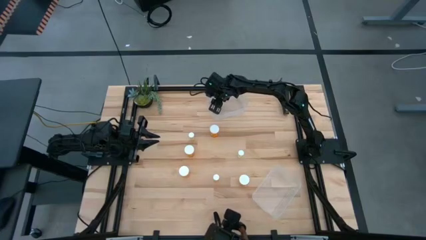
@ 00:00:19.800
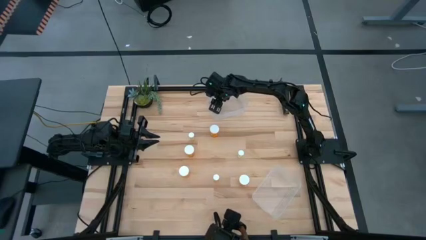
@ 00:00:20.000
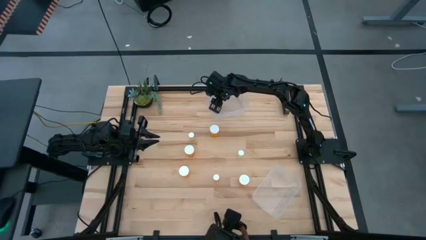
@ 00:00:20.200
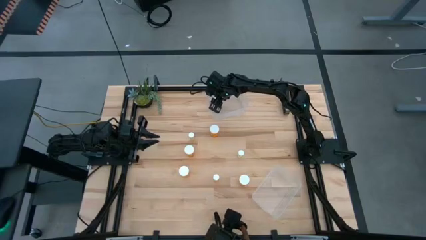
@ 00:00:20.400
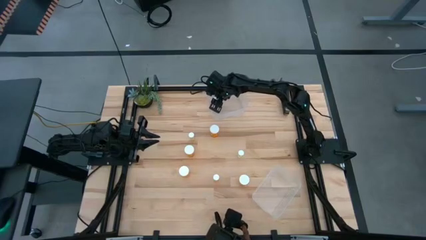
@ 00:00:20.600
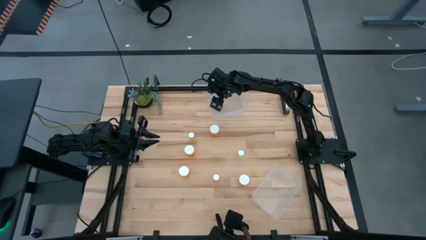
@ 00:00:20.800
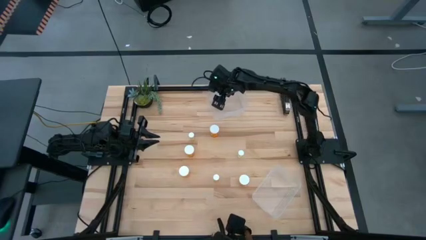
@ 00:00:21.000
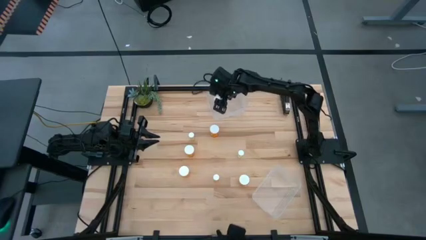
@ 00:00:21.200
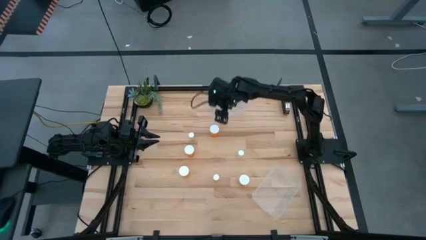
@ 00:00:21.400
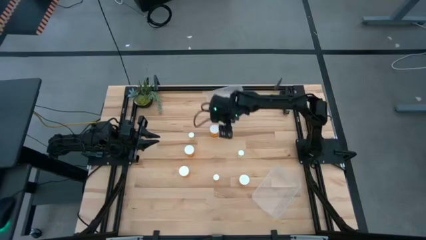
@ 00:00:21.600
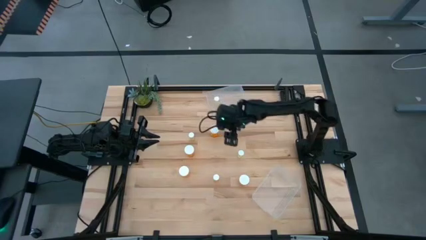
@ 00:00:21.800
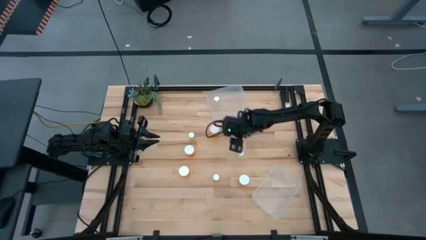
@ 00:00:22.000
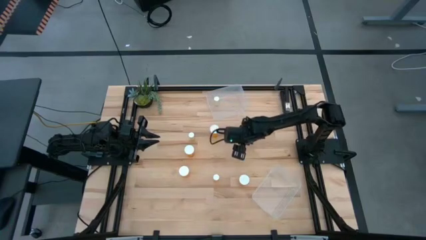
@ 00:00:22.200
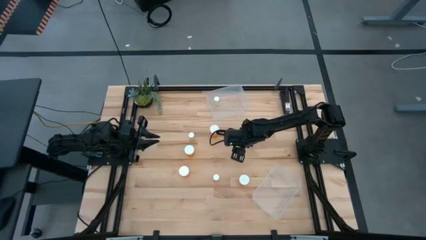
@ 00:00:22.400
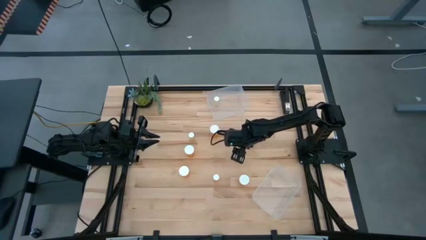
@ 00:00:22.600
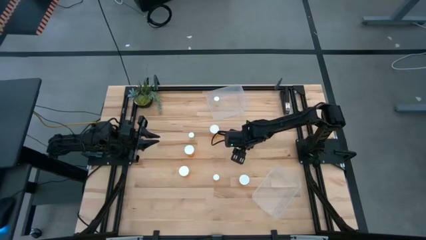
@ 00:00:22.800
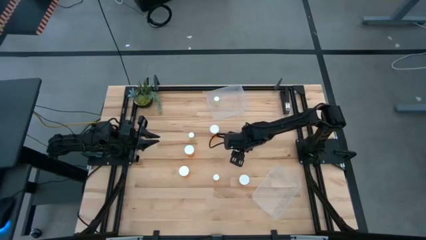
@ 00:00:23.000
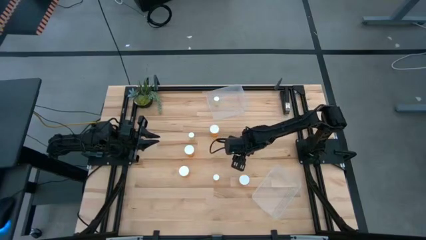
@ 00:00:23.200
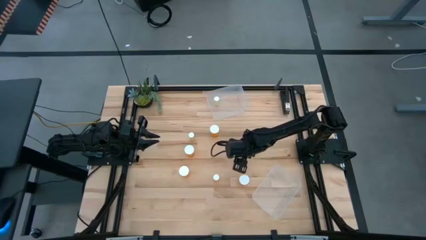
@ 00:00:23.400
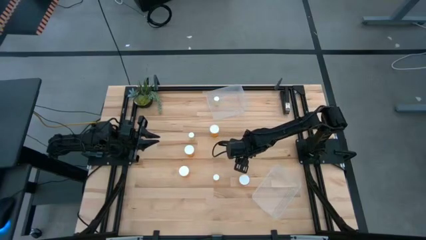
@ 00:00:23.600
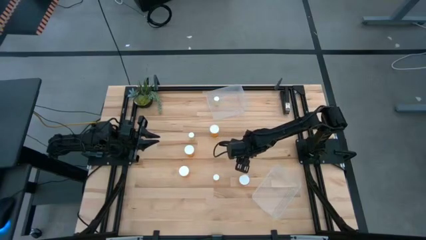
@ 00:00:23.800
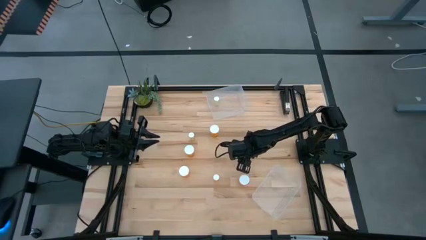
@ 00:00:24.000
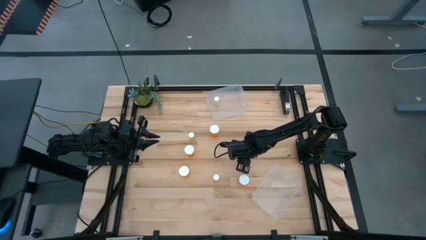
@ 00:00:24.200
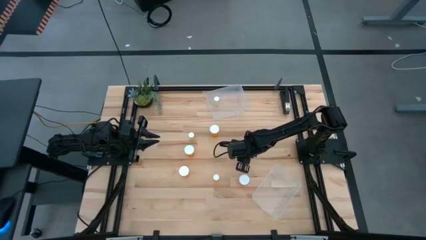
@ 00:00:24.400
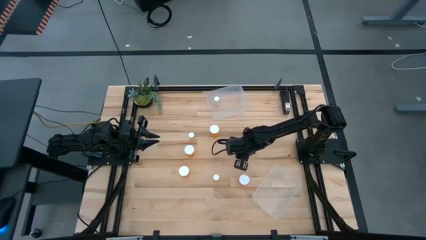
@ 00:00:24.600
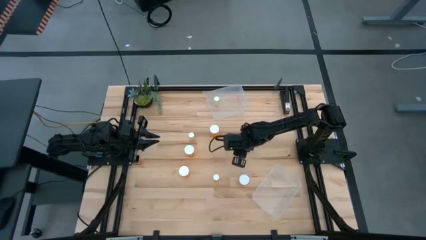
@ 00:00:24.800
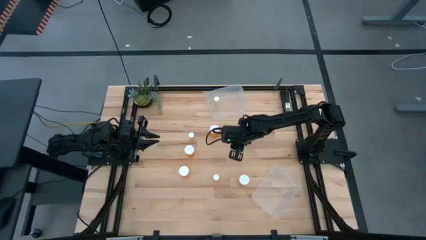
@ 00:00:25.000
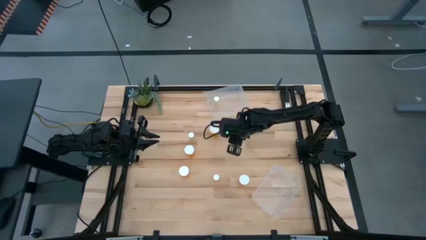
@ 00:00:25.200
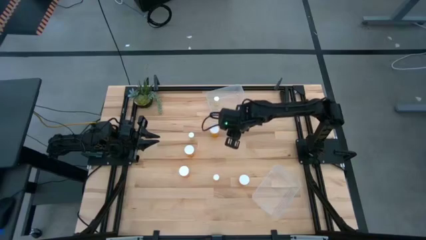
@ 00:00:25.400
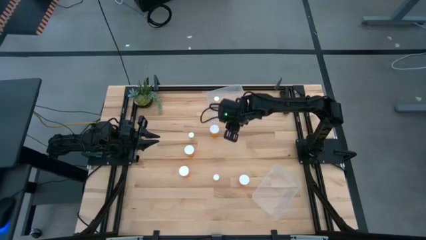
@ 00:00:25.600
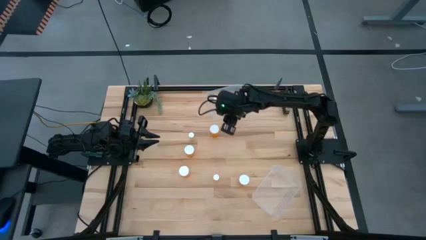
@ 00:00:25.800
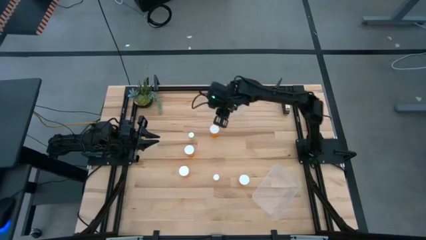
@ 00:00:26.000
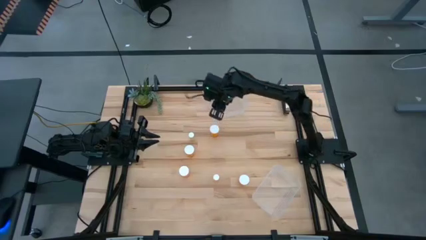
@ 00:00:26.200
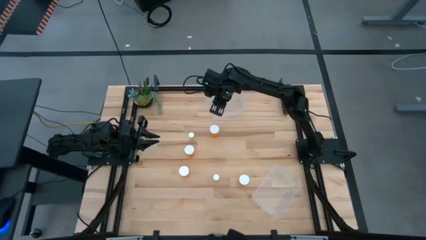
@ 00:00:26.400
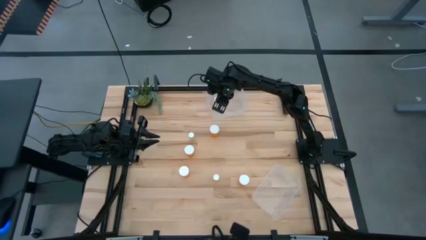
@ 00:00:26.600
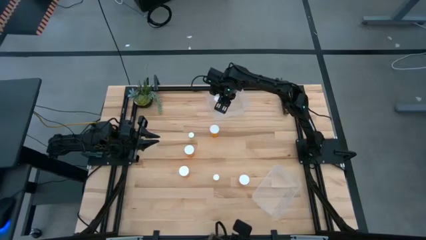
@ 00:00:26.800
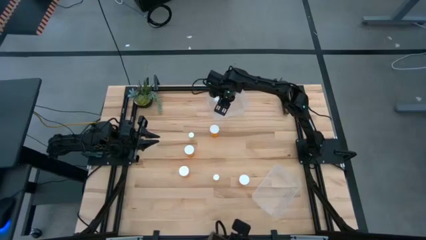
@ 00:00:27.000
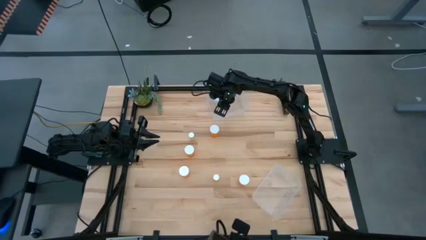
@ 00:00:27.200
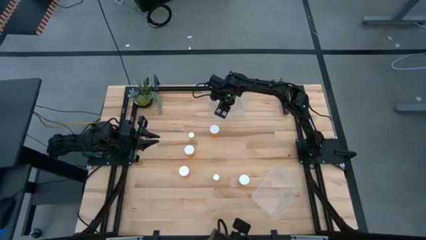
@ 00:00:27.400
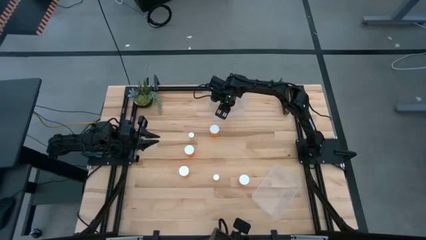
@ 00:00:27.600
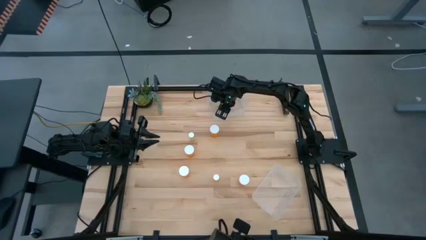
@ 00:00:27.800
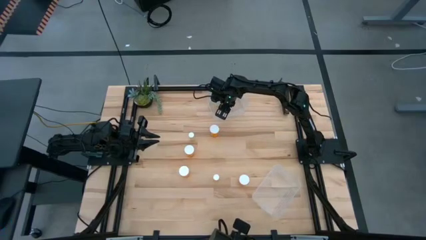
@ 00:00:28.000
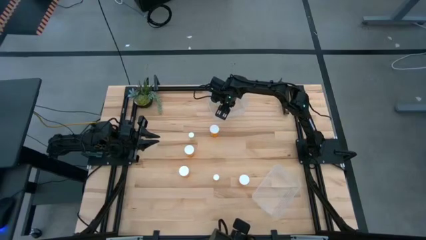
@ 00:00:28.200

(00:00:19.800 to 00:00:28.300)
Task: Pick and place medicine bottles into bin by pill shape (circle, oval)
Put the right yellow pill bottle into the top transparent bin

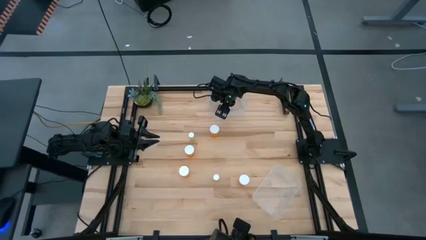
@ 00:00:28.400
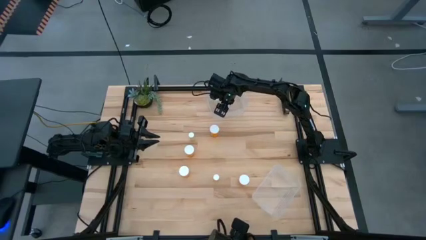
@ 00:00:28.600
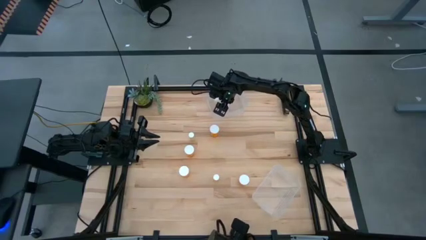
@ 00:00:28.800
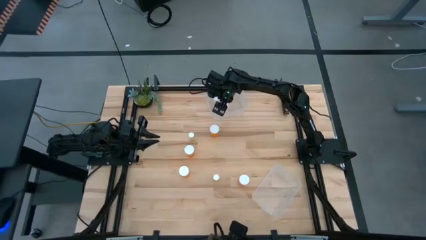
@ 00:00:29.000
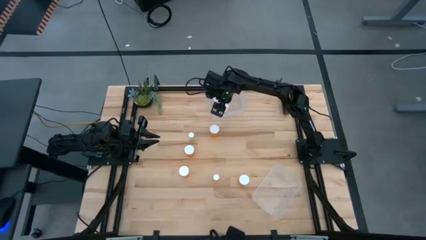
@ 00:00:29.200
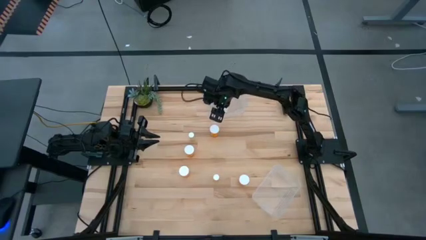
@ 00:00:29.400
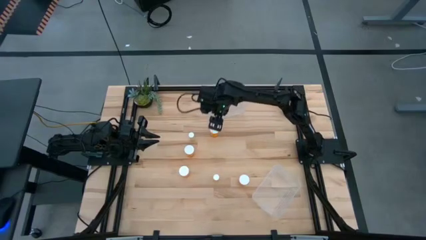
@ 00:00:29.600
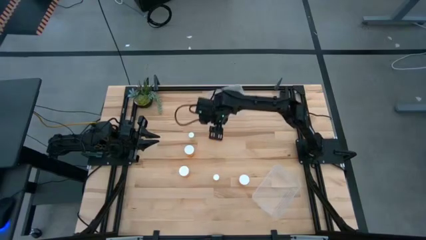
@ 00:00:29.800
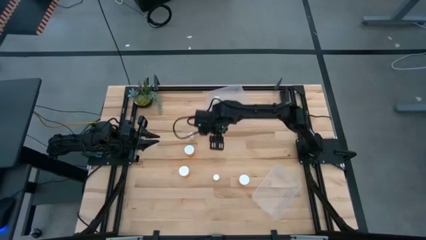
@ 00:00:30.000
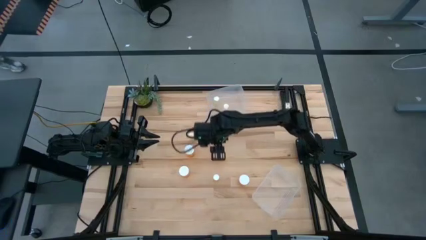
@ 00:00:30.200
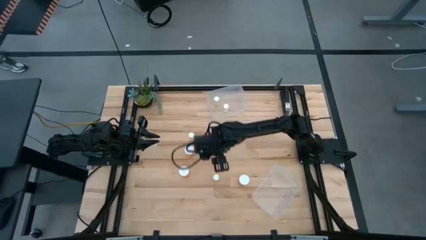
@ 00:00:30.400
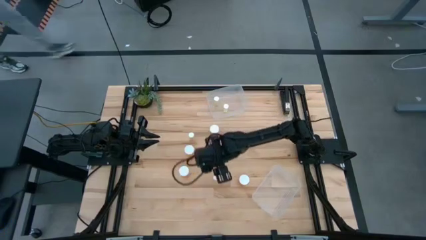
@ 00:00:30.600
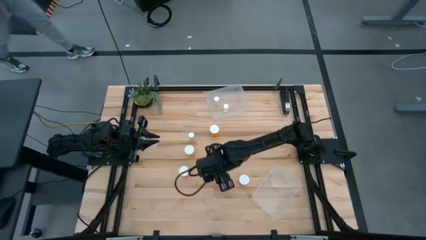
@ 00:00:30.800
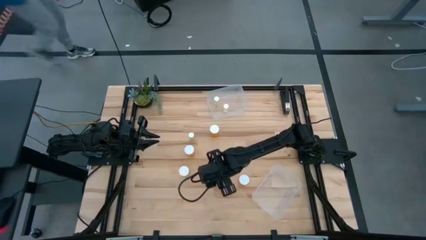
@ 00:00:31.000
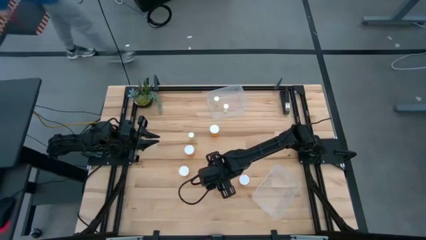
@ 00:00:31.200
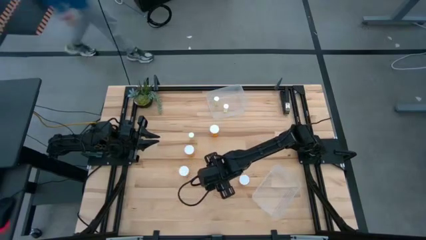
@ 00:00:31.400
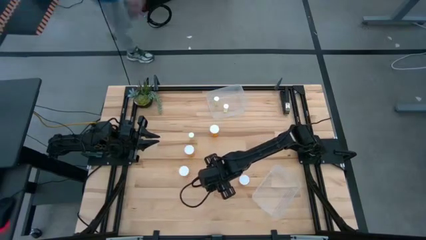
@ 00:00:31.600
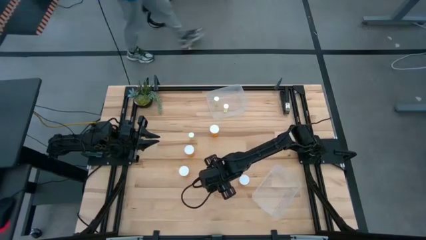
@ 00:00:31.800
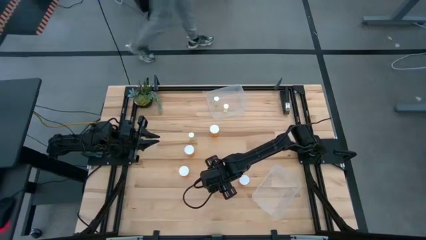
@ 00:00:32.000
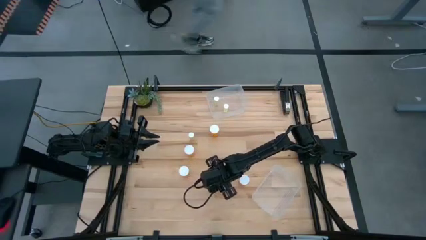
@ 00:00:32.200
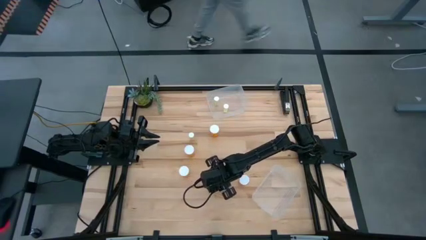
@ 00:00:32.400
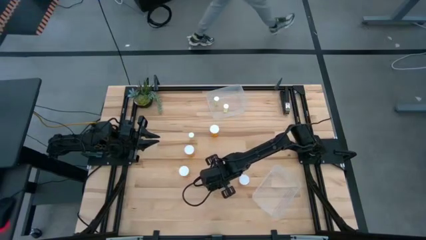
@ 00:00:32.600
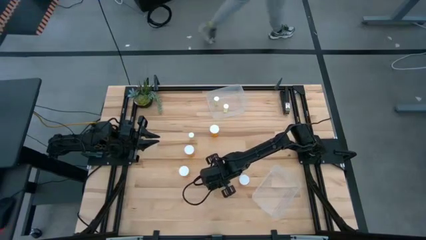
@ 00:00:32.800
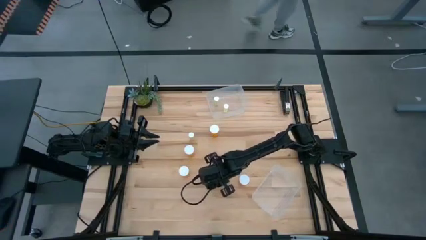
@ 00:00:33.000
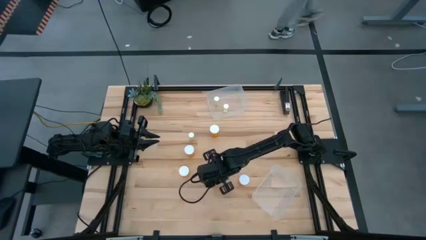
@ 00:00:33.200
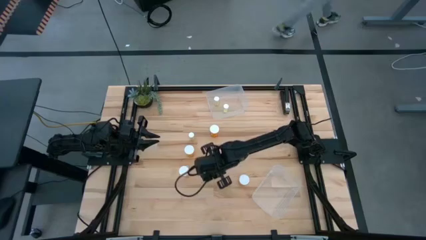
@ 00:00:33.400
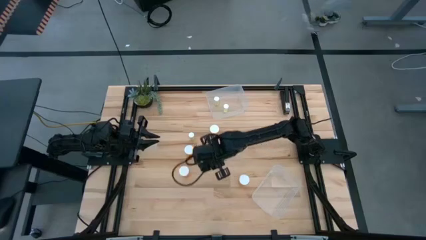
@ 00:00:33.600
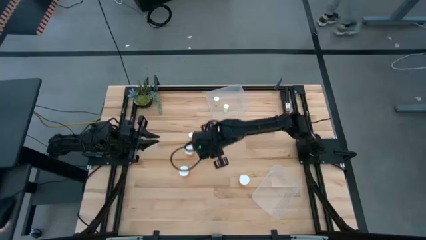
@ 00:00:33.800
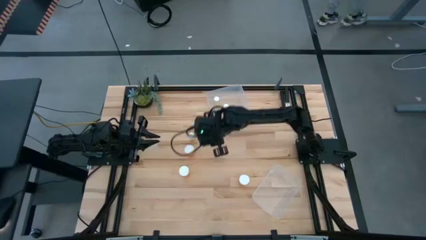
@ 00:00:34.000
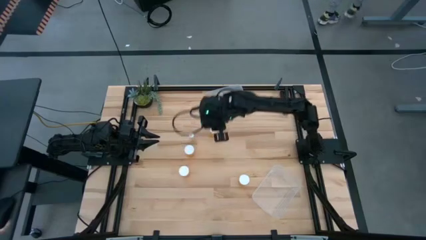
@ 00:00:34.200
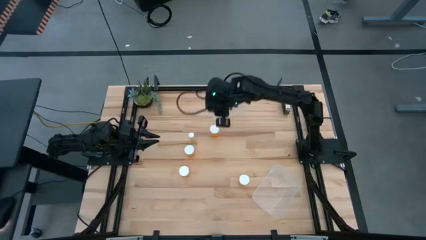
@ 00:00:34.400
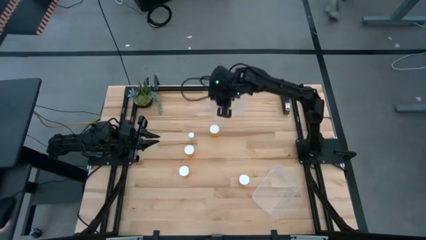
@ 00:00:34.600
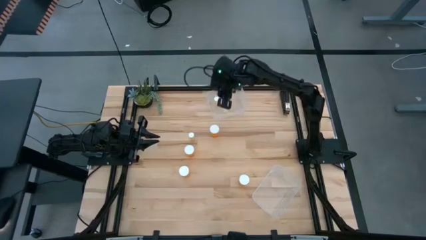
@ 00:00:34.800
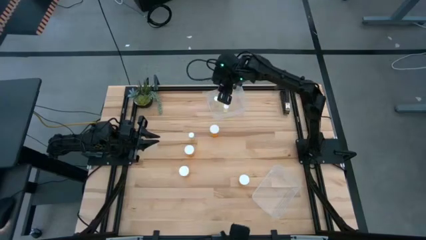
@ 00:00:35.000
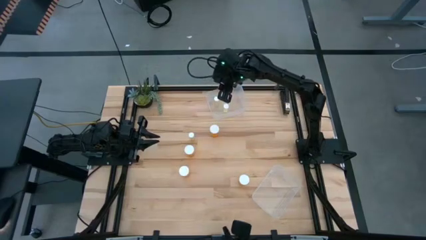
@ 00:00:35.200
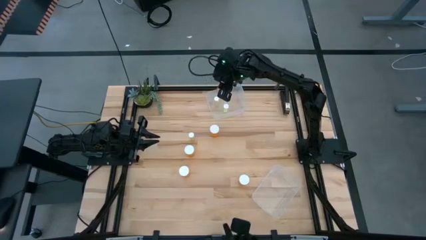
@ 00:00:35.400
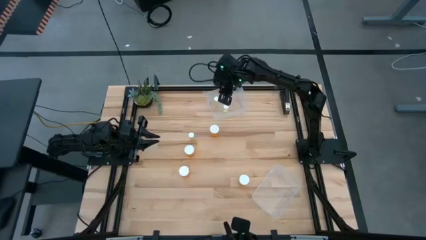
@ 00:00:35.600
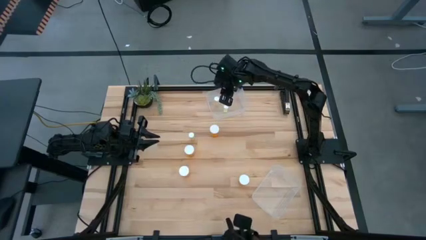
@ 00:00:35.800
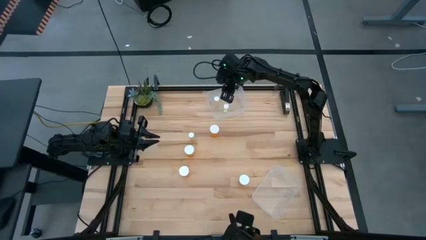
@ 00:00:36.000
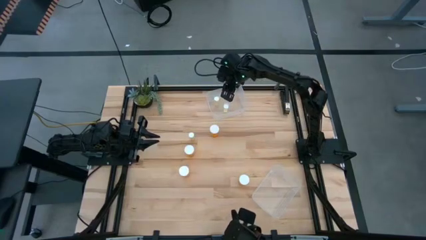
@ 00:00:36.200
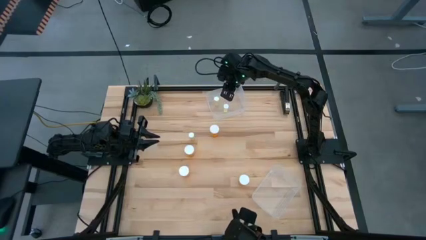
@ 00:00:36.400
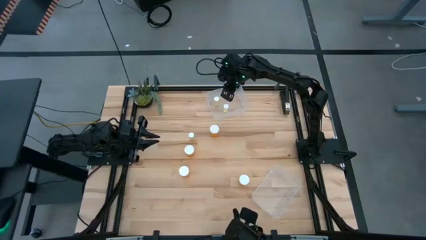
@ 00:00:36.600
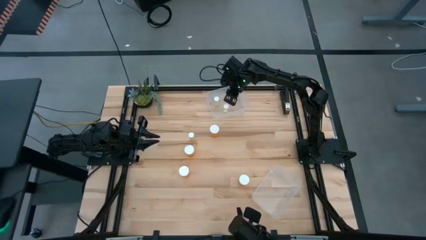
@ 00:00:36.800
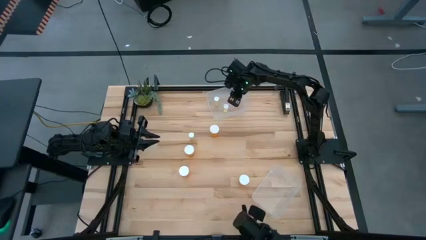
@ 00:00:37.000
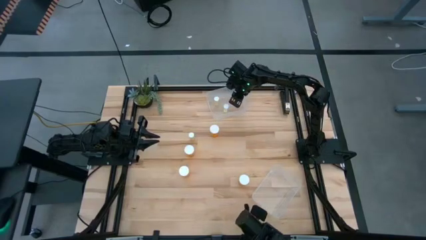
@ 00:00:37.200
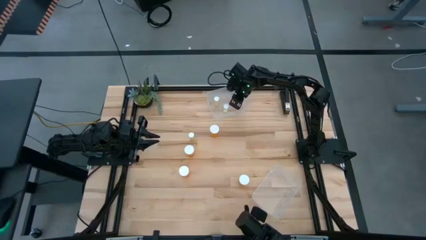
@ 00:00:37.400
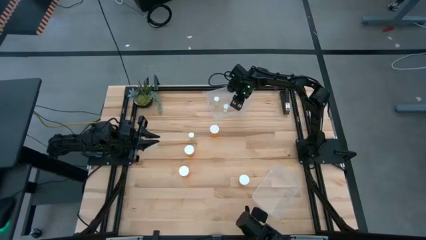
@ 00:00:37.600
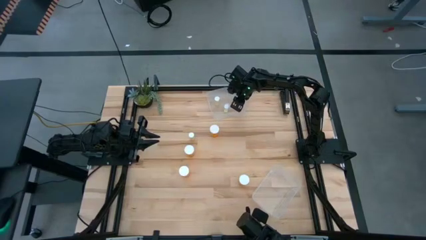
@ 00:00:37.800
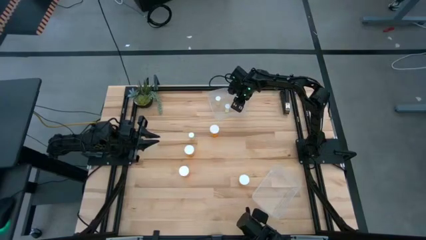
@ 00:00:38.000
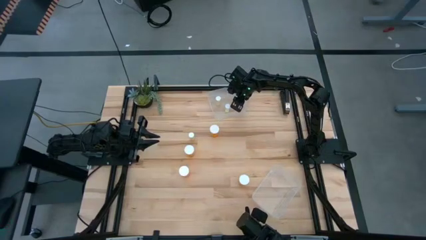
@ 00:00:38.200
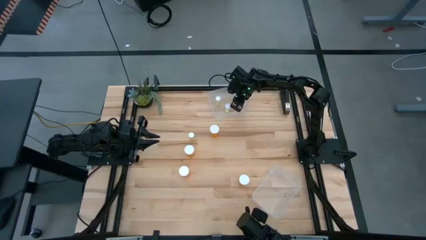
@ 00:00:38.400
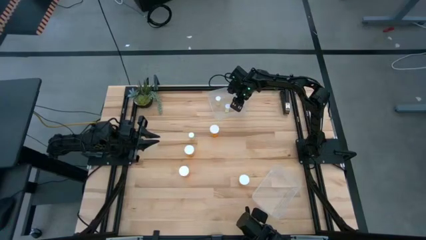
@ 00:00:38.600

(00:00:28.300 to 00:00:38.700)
Put the small orange pill bottle into the top transparent bin
